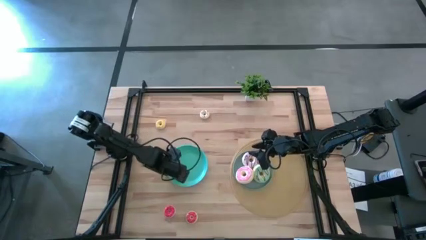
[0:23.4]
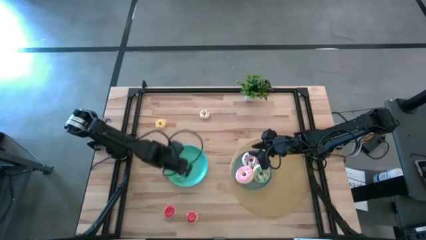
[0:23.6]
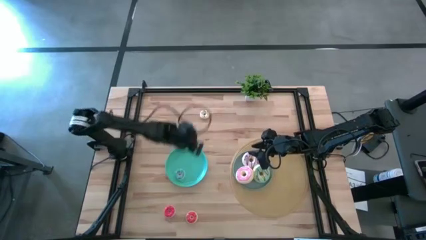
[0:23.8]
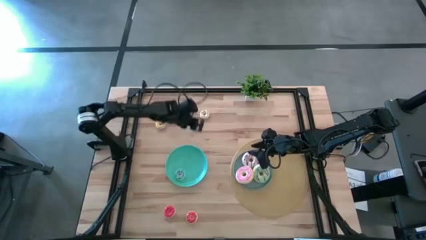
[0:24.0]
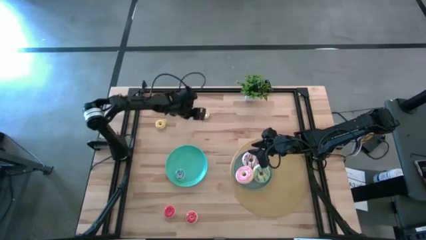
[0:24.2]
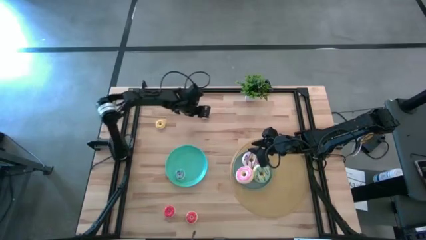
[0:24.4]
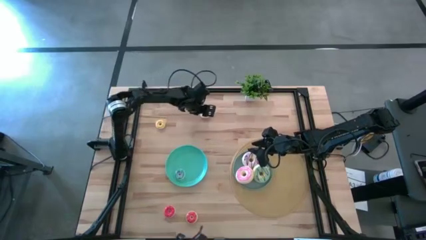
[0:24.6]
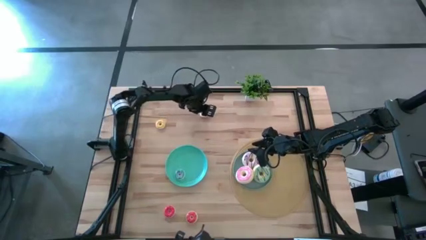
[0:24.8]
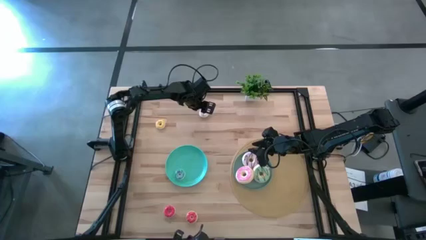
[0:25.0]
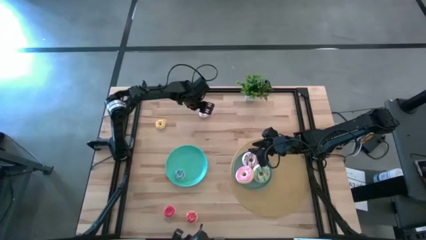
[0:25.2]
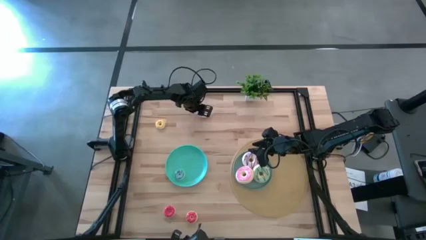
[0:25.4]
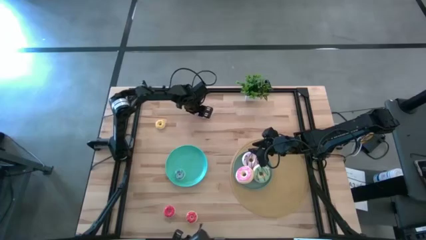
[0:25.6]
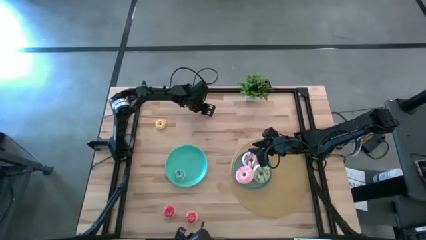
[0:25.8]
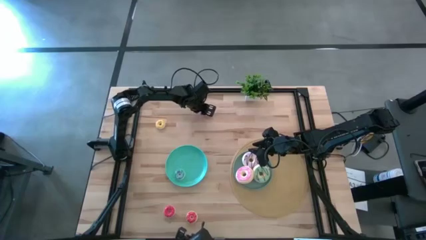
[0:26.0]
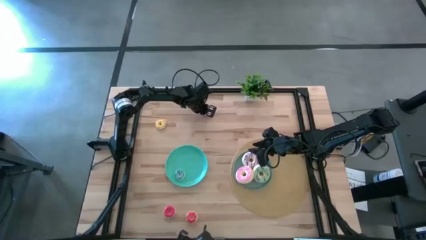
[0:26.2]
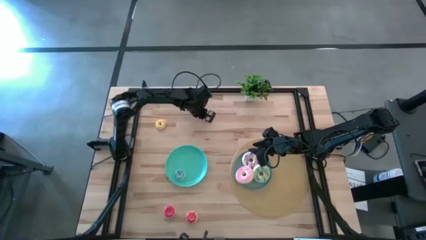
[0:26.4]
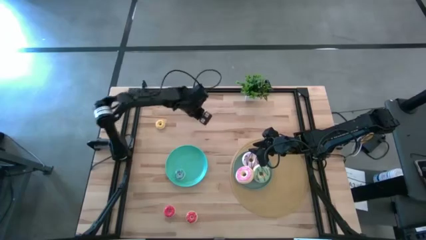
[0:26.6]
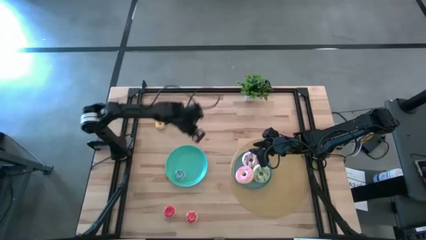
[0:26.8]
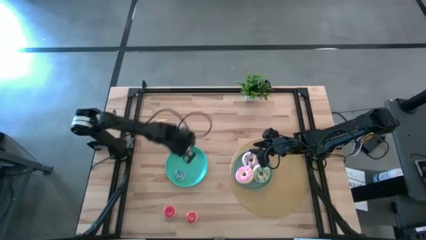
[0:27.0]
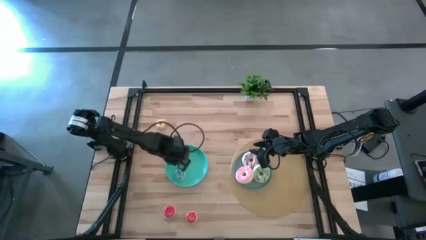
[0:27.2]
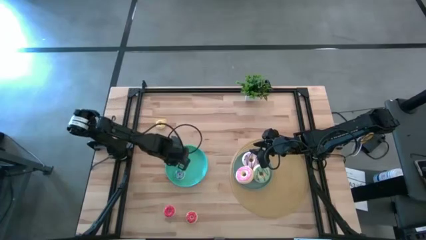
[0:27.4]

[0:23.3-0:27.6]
Task: Pick & Place donuts
Put the small white donut on the blue plate

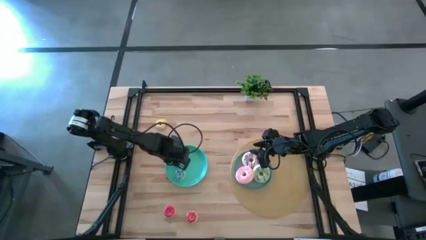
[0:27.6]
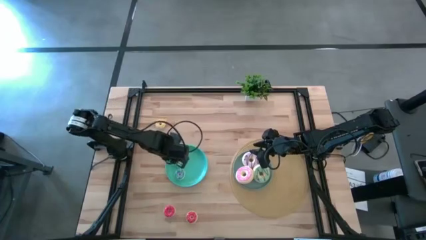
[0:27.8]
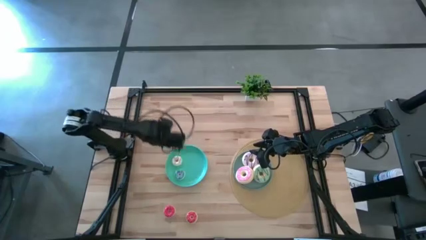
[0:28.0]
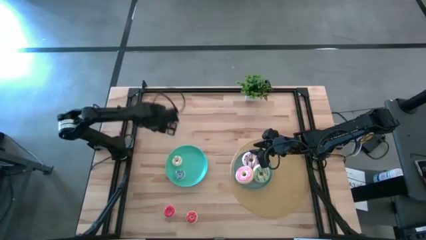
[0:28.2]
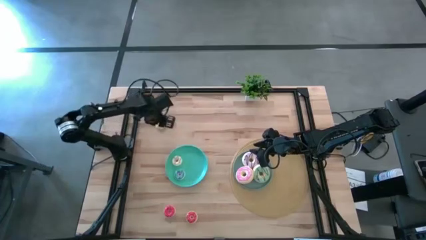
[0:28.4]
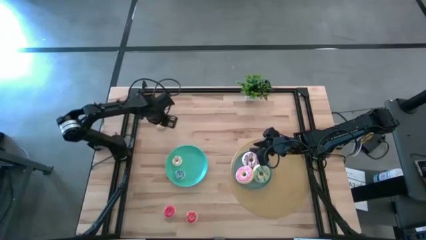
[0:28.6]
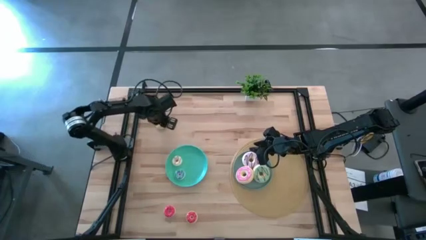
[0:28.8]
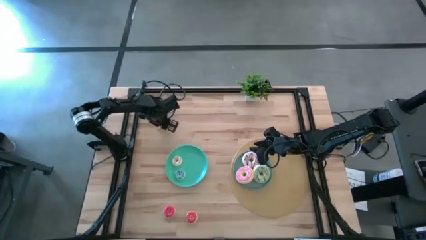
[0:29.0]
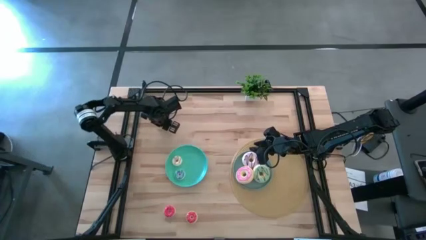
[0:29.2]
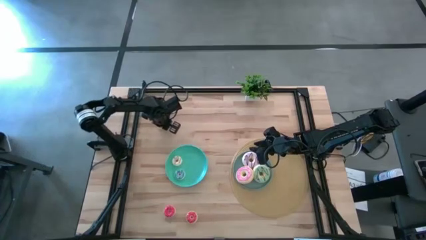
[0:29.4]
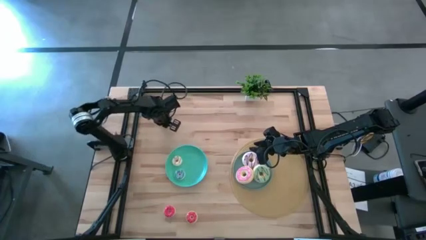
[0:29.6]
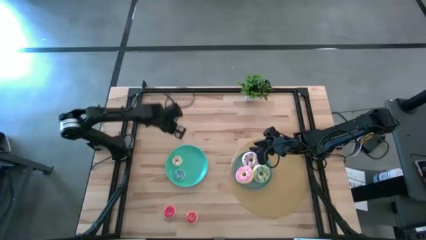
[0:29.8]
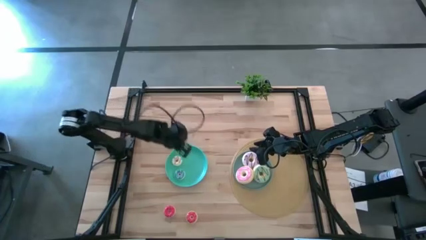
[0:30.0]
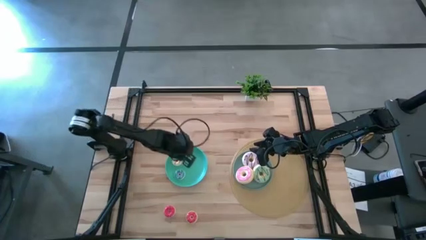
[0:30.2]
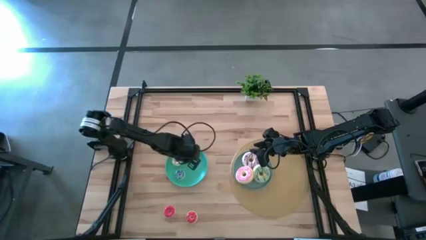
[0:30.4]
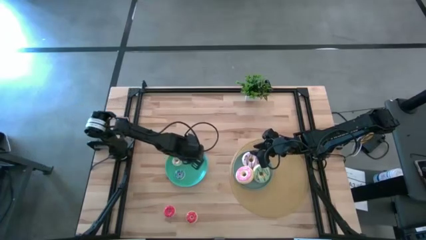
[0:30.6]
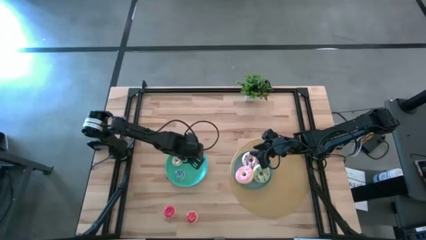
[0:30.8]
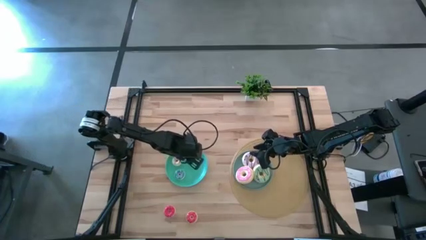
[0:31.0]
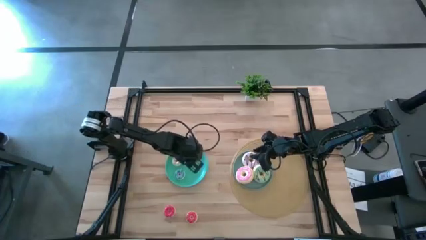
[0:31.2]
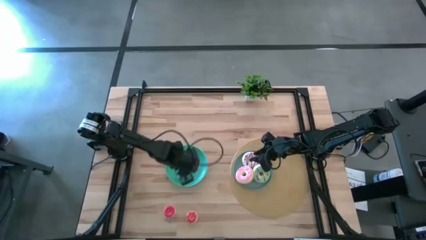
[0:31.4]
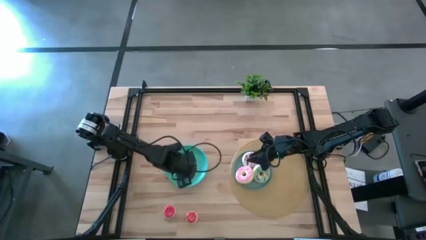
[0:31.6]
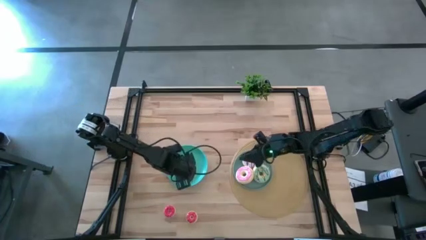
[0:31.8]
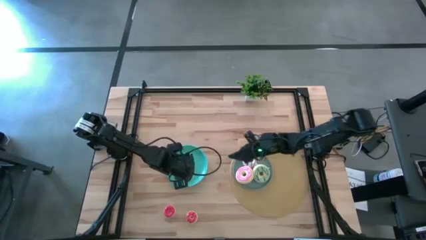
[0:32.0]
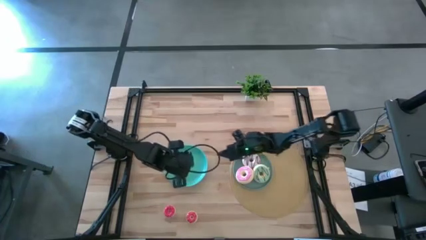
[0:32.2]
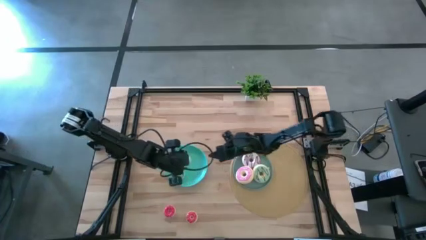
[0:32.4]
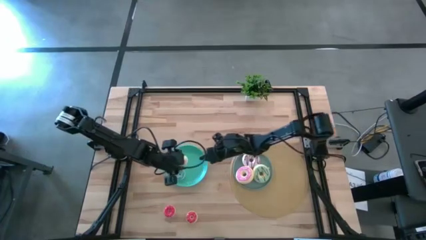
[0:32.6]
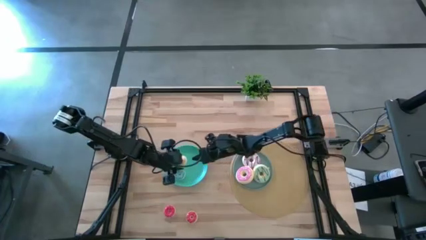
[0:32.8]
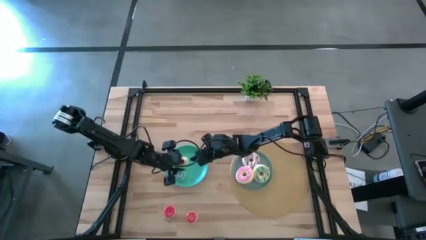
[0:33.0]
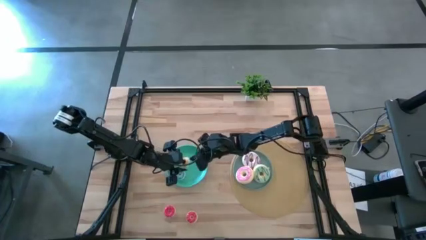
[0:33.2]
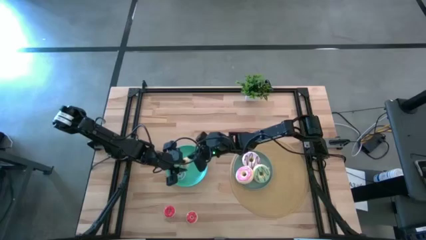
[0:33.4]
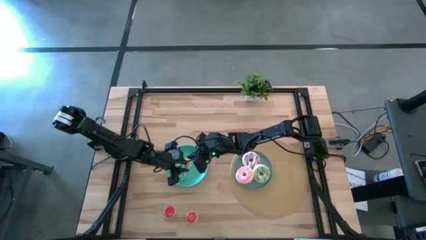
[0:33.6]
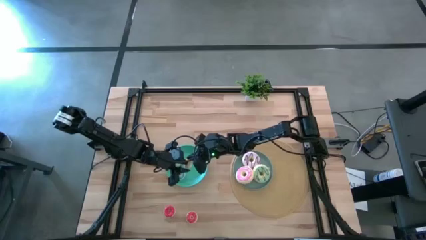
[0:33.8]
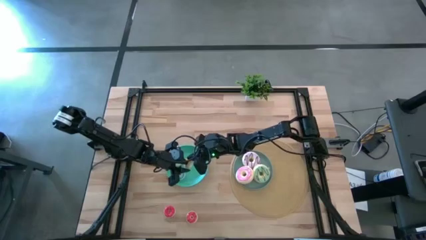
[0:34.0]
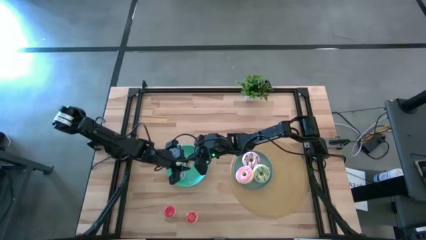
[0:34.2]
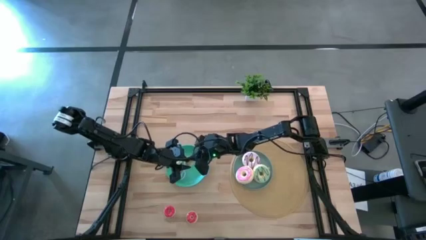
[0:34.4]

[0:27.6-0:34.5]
Put the small yellow donut on the blue plate

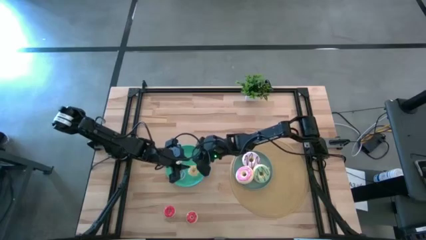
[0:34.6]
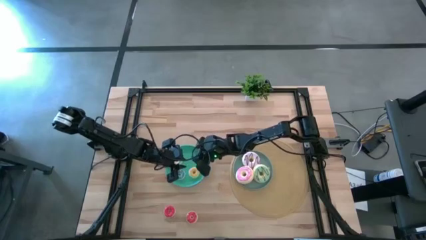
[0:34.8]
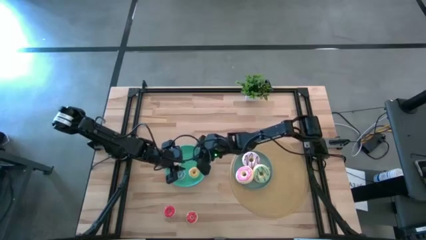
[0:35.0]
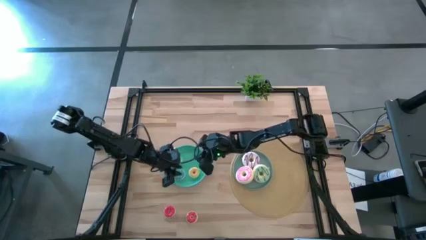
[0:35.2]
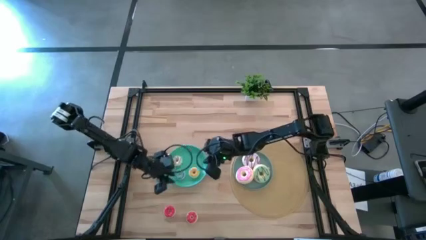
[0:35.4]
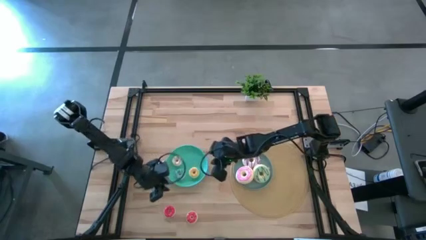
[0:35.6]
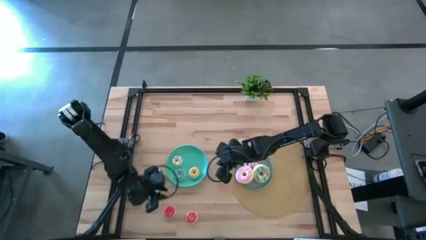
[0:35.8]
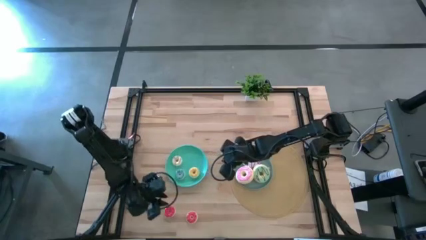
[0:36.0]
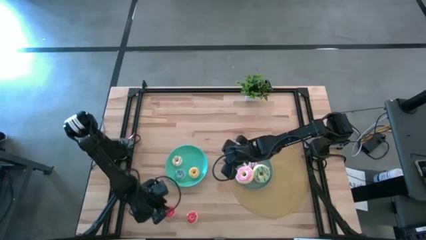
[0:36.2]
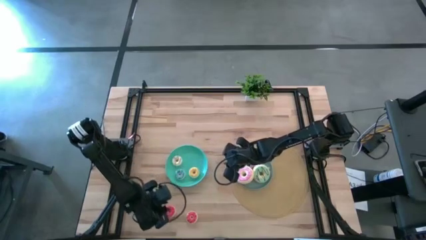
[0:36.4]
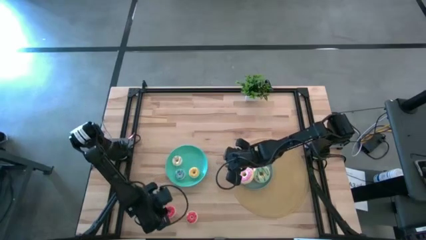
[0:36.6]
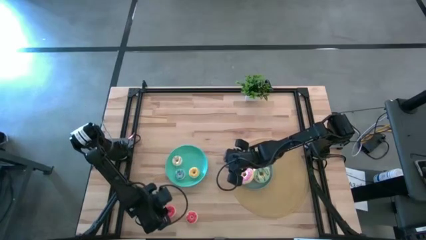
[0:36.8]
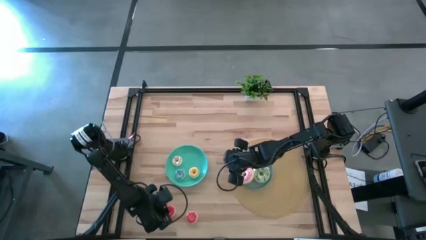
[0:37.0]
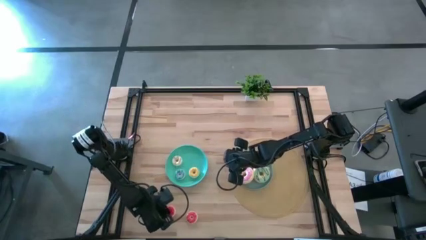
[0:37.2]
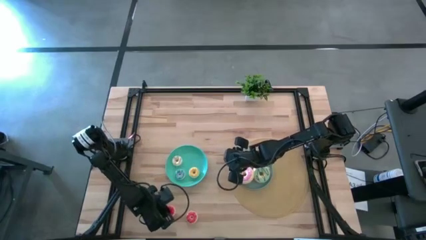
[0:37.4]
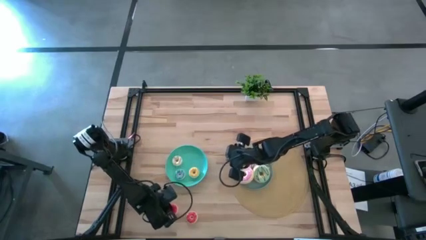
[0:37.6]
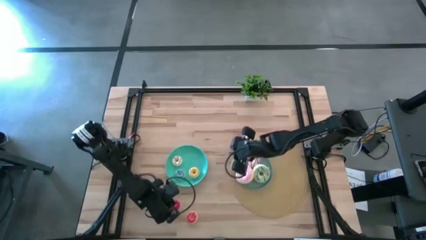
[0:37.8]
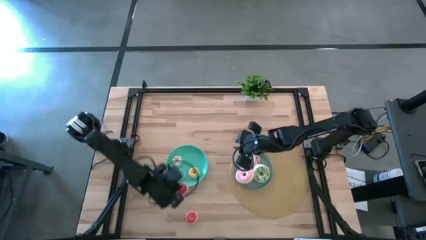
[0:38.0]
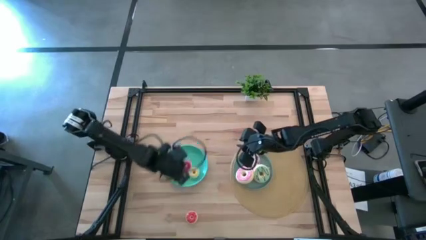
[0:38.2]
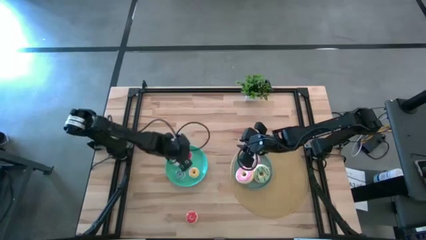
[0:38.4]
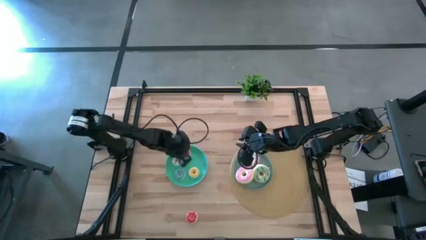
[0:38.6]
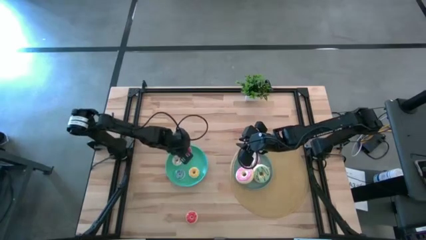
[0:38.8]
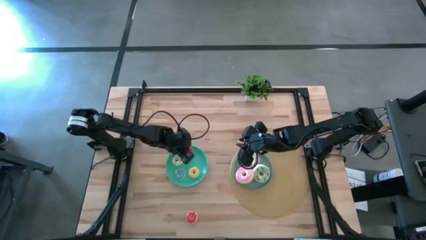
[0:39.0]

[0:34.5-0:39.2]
Put the small red donut on the blue plate

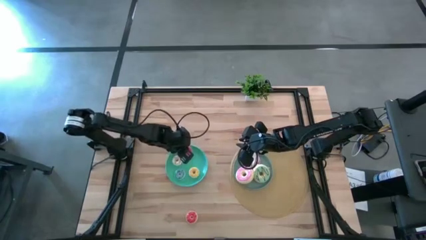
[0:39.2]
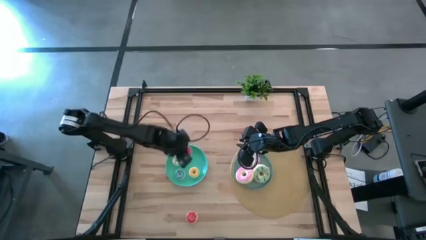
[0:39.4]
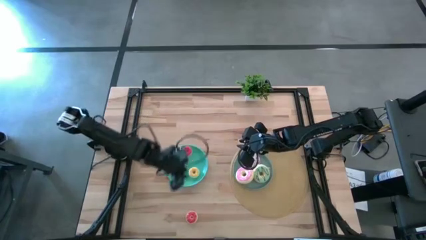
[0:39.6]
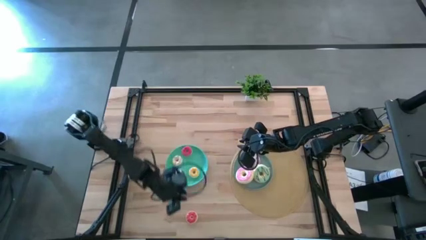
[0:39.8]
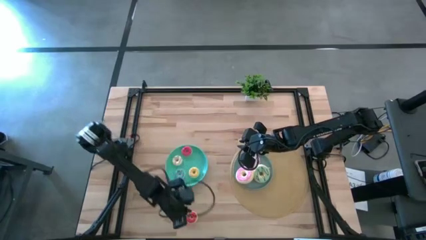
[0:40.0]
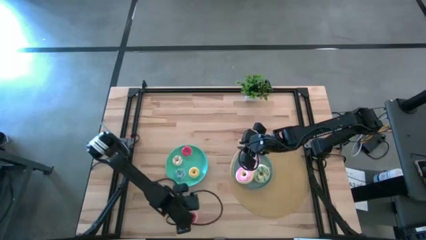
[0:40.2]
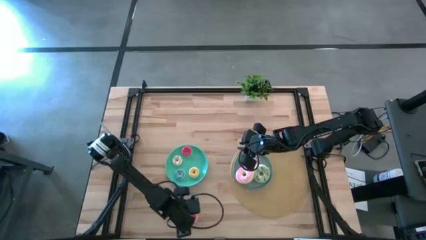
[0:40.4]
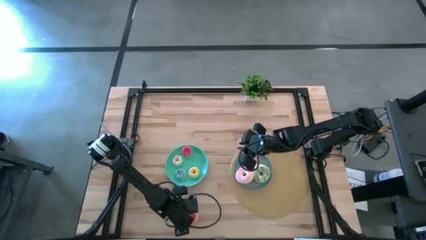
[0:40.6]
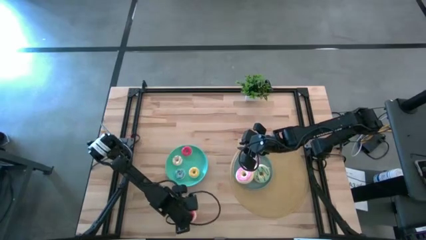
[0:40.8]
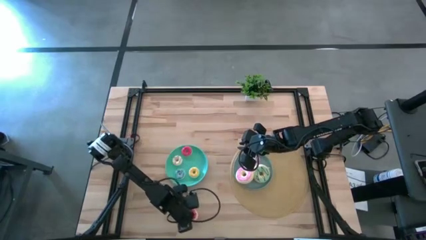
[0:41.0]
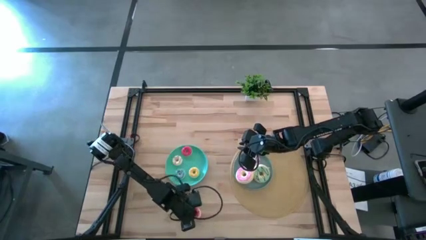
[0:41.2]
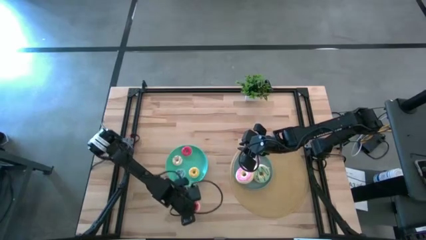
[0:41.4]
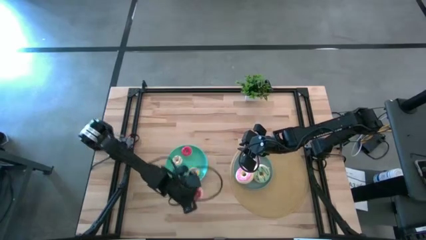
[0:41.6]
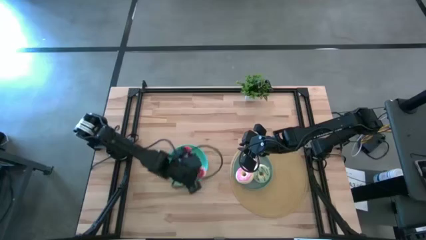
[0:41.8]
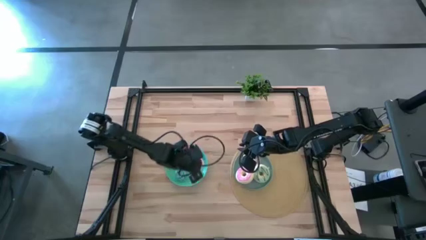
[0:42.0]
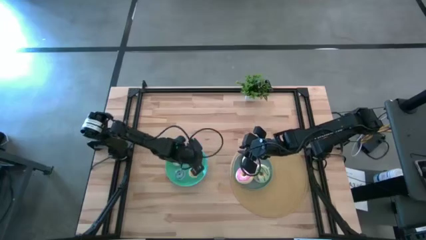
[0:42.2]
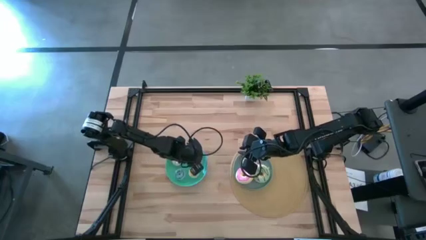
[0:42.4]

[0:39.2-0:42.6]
Put the small orange donut on the blue plate
